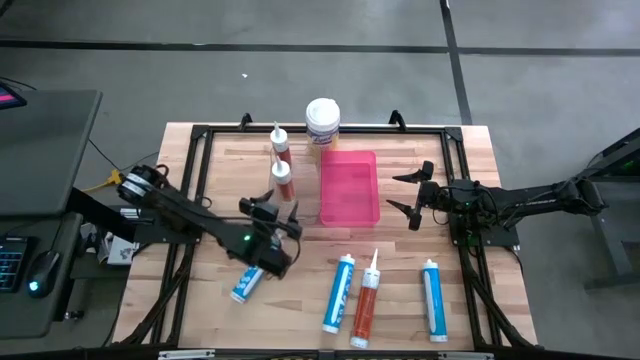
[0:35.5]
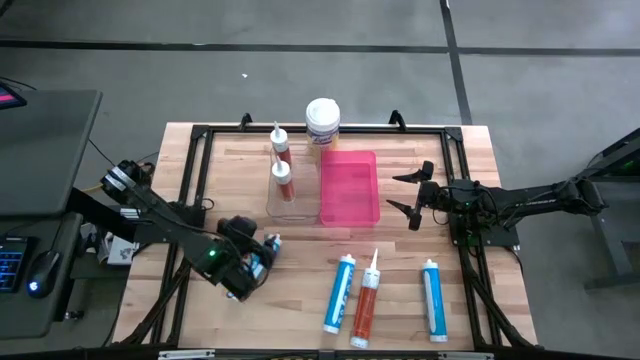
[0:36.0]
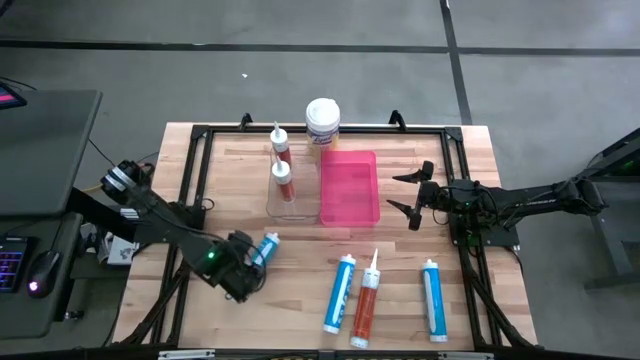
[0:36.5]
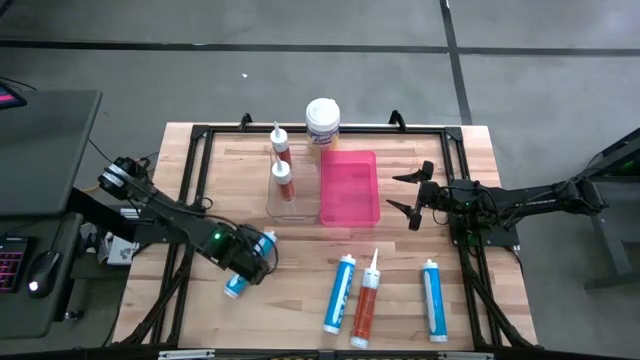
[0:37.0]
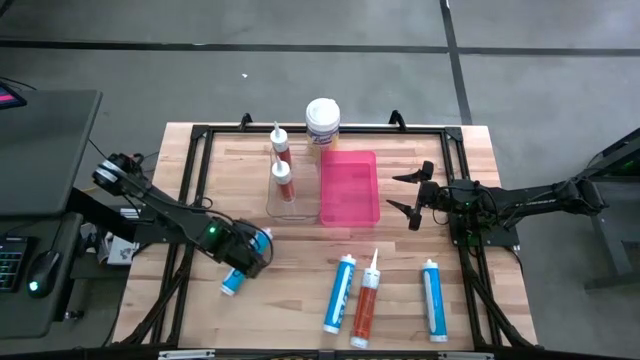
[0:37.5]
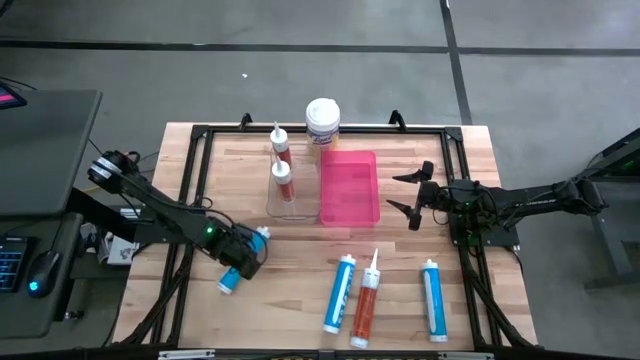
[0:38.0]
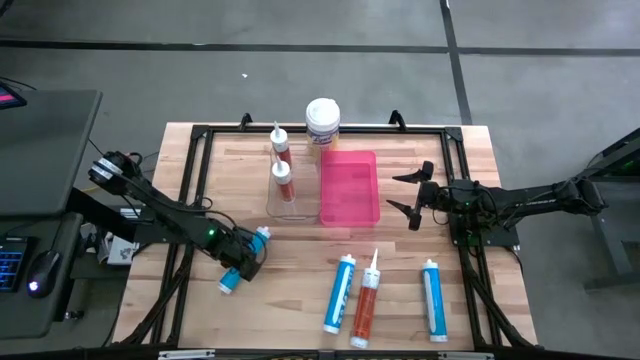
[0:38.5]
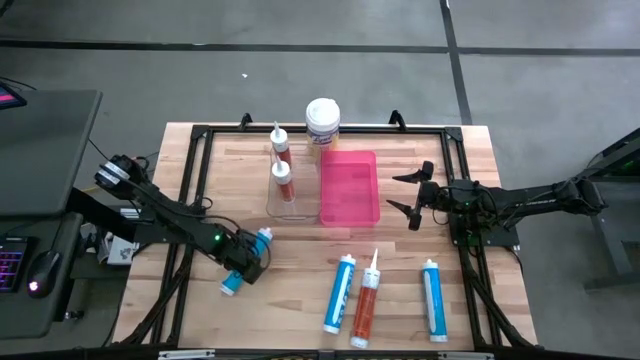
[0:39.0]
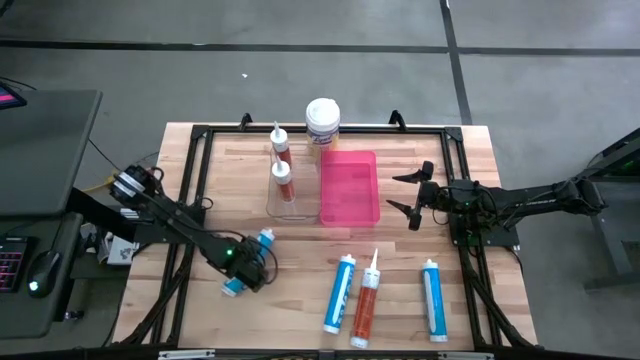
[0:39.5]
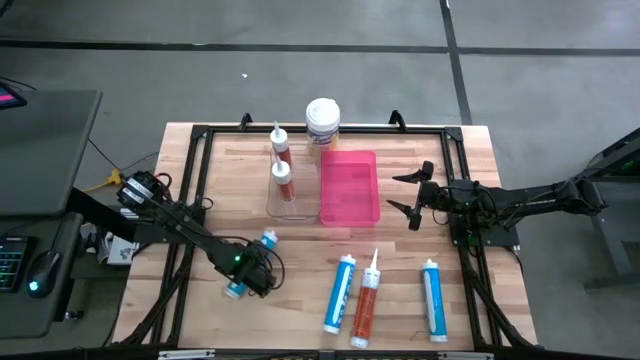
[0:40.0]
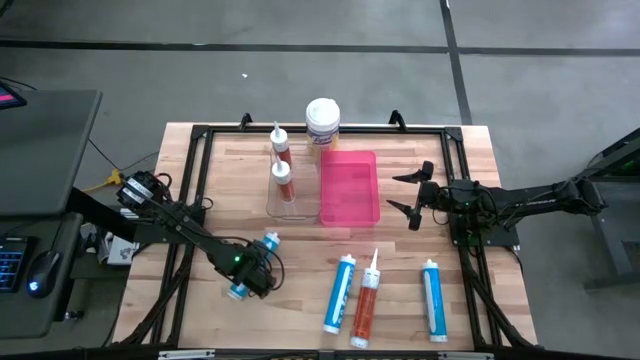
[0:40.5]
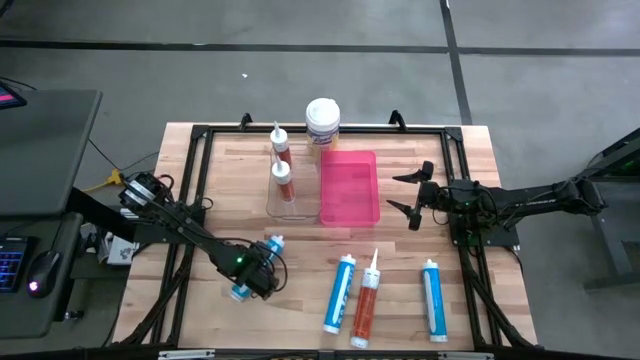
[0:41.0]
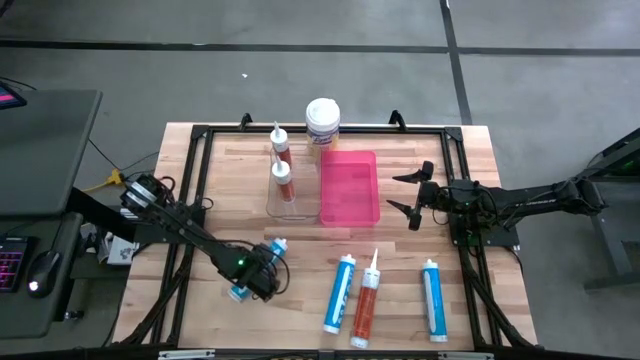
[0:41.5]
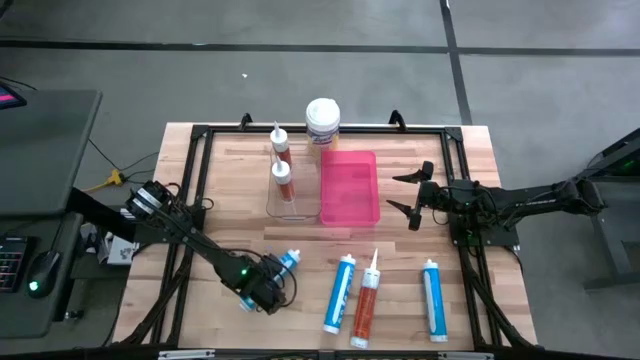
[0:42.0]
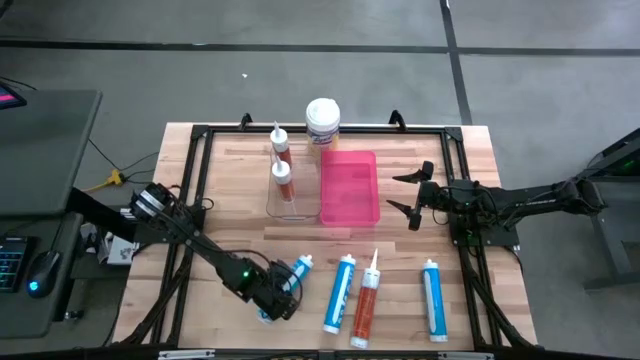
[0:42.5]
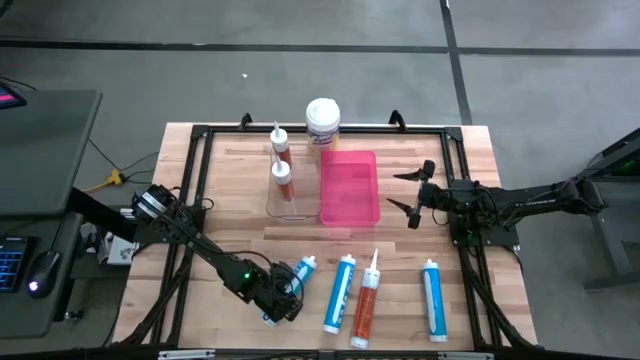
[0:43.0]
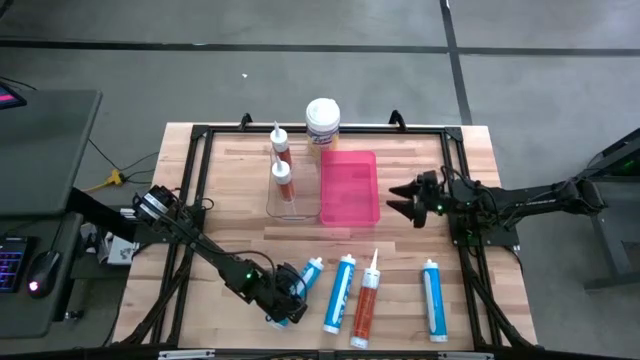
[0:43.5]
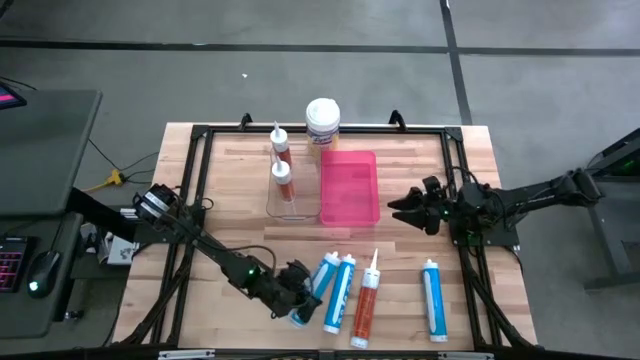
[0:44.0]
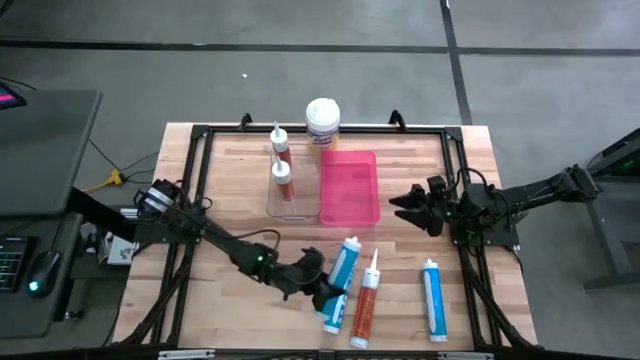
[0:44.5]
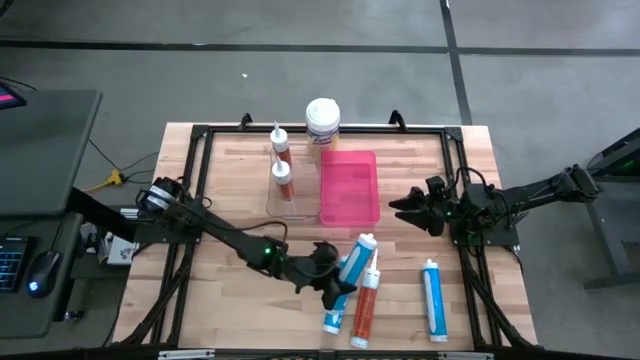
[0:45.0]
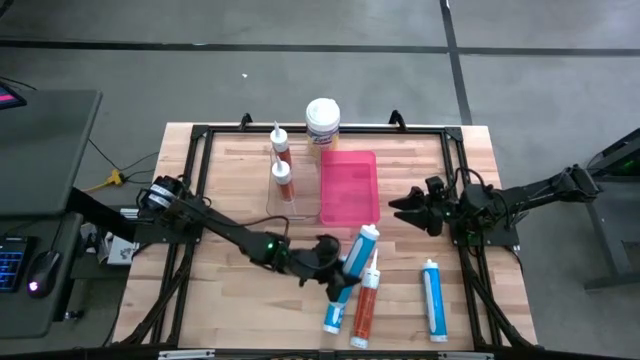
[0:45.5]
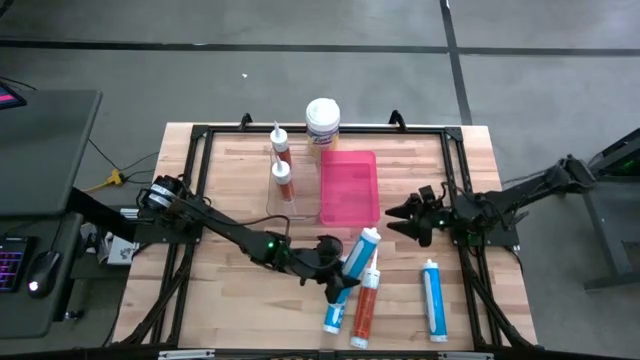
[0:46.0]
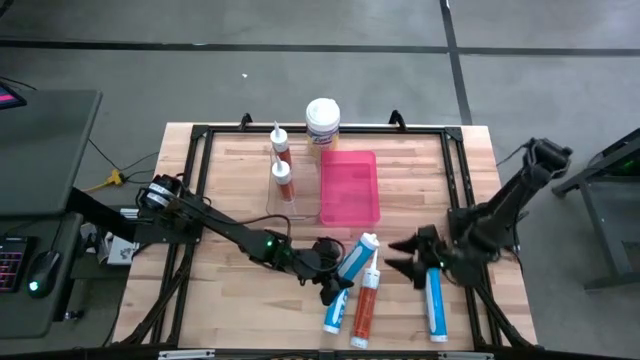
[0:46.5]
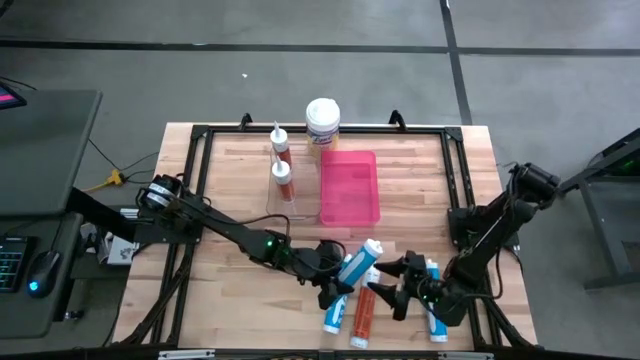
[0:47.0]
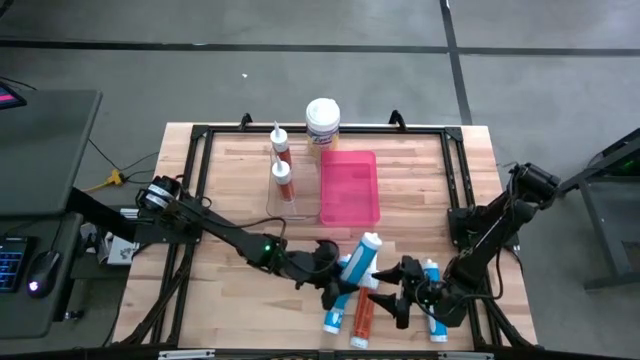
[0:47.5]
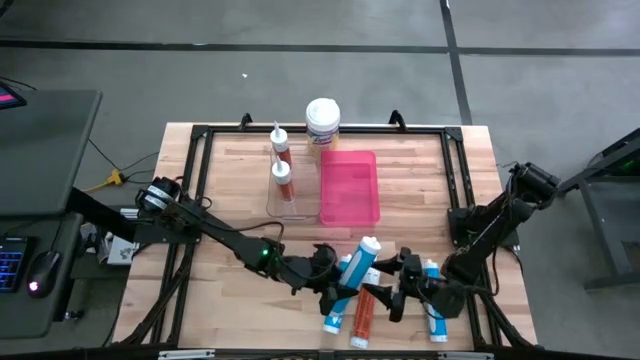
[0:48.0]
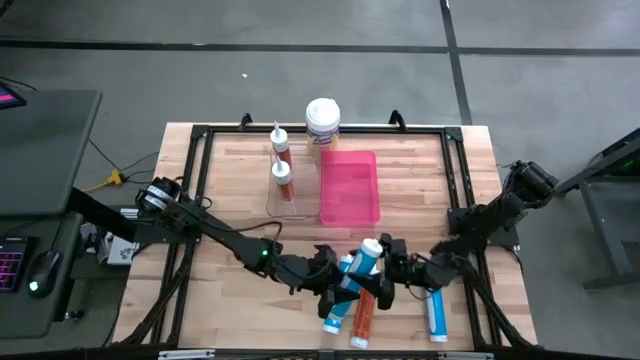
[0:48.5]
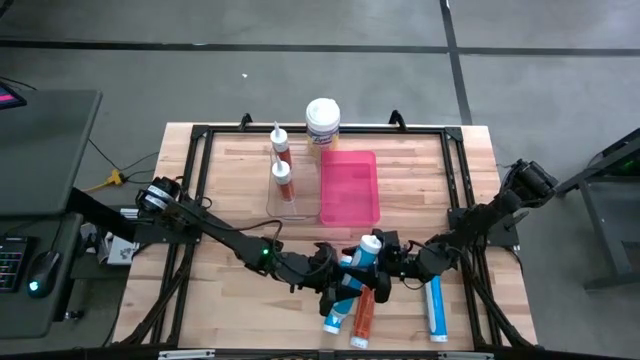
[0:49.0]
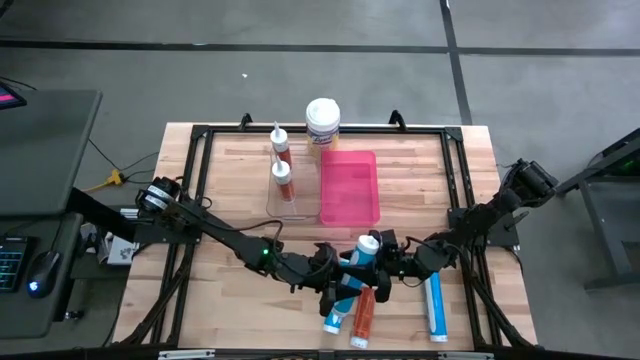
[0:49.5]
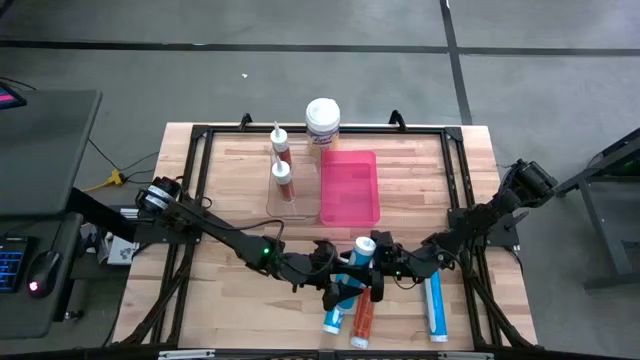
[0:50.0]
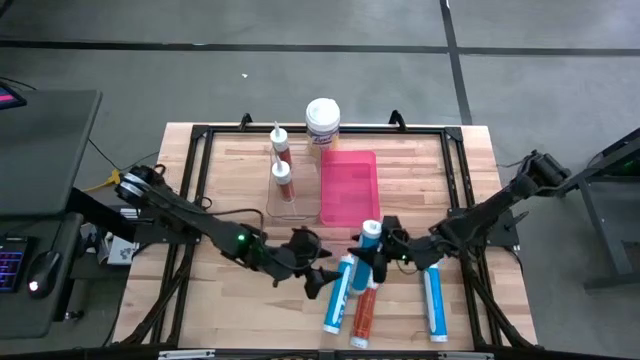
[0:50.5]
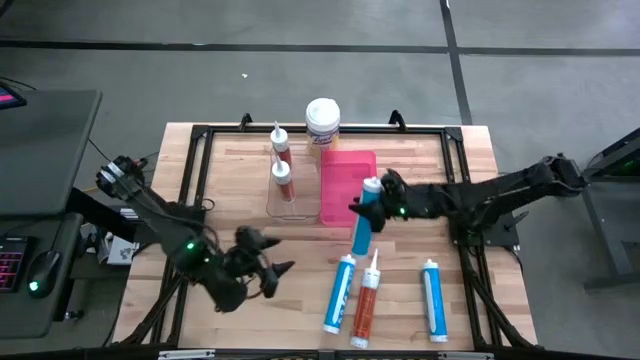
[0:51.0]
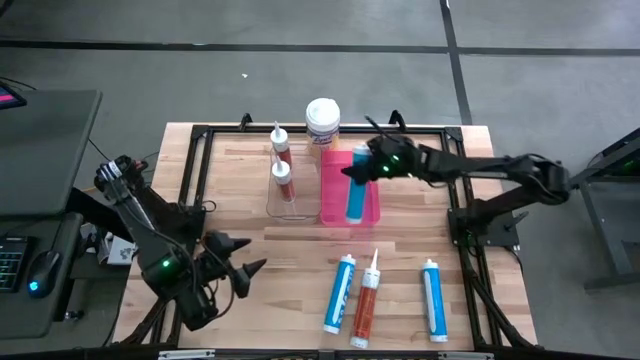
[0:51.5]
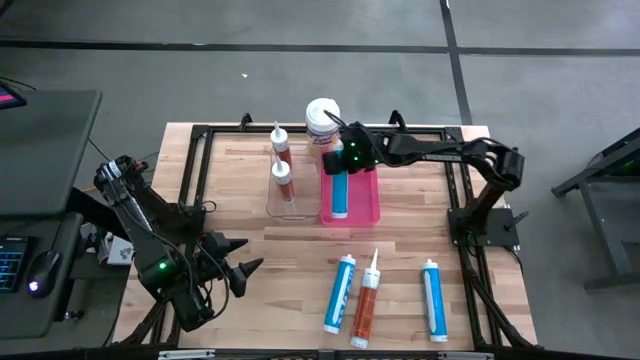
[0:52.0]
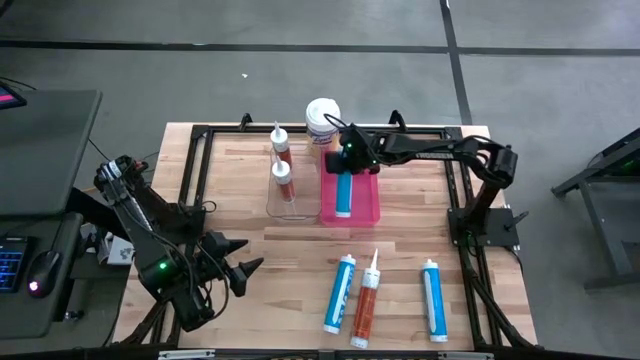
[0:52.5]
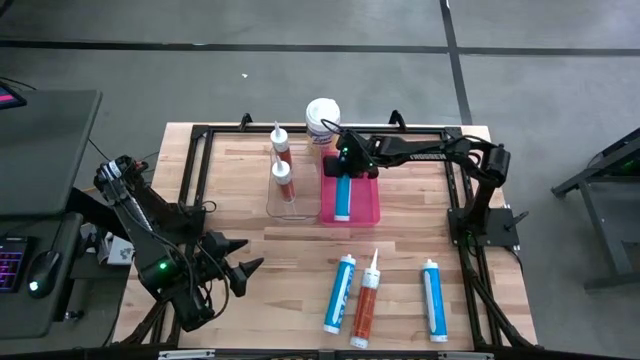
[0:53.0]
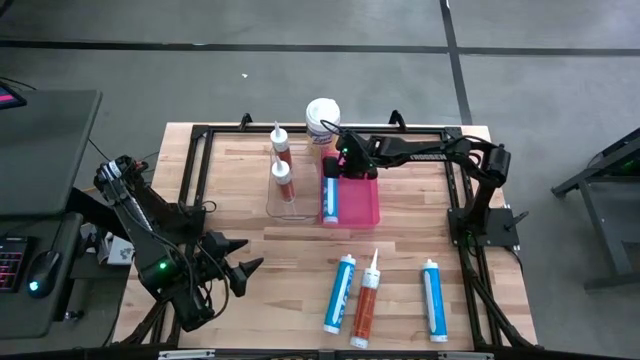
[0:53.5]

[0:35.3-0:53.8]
Task: Pick & place silicon tubes, Sealant and Lysol wipes
Put the left blue sealant into the pink container

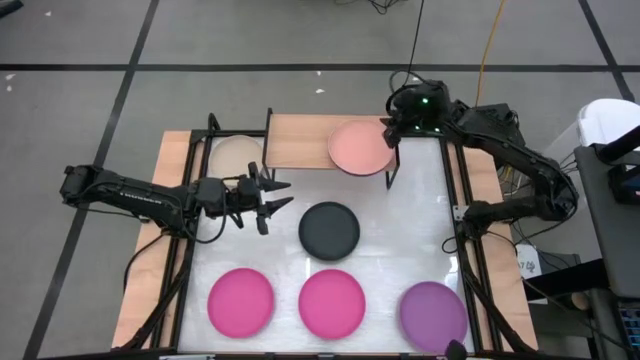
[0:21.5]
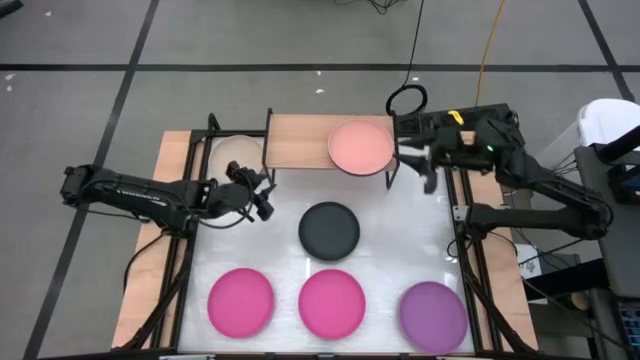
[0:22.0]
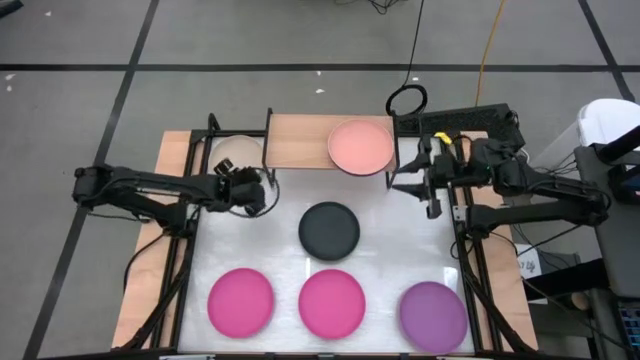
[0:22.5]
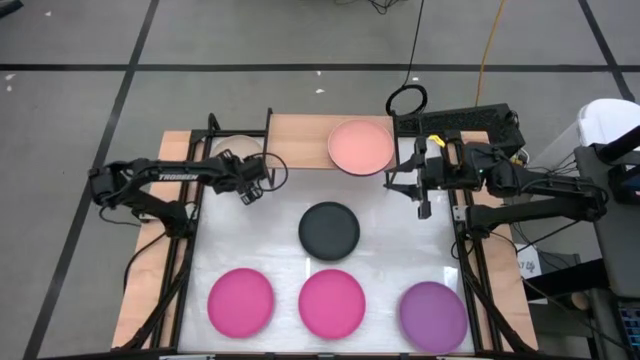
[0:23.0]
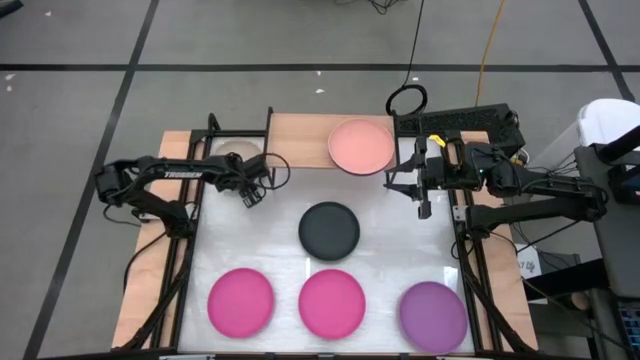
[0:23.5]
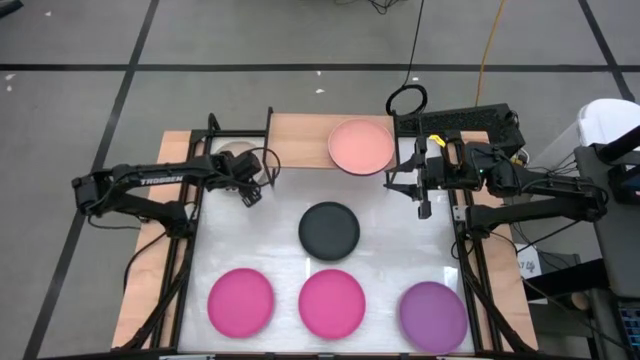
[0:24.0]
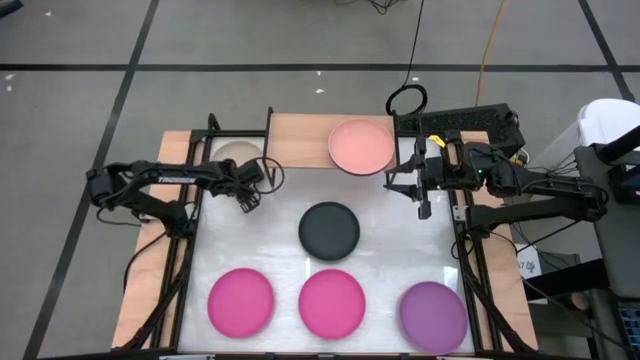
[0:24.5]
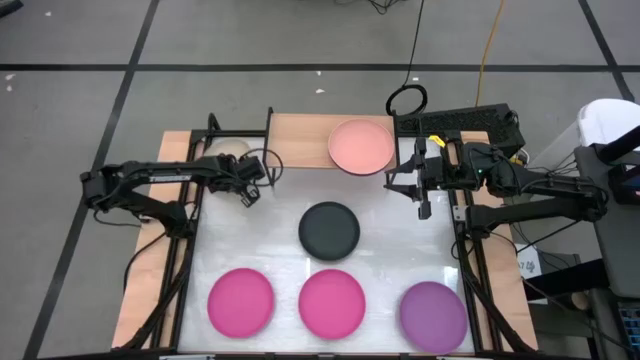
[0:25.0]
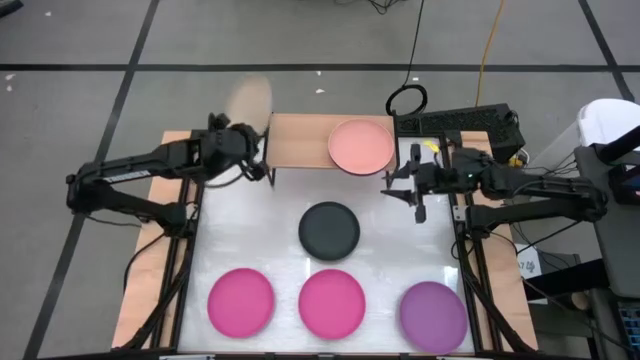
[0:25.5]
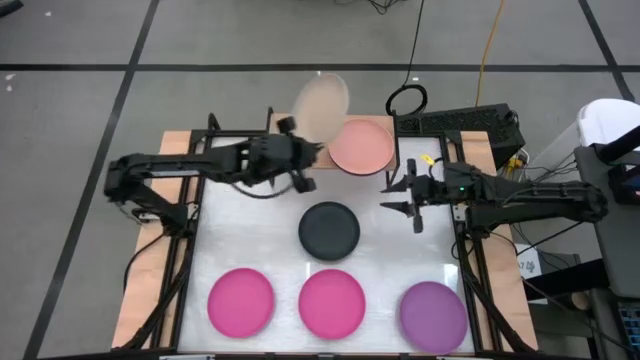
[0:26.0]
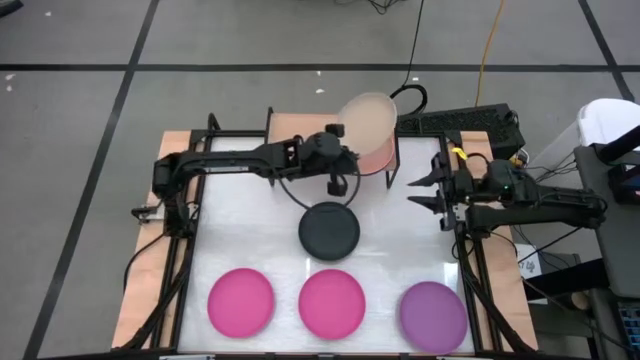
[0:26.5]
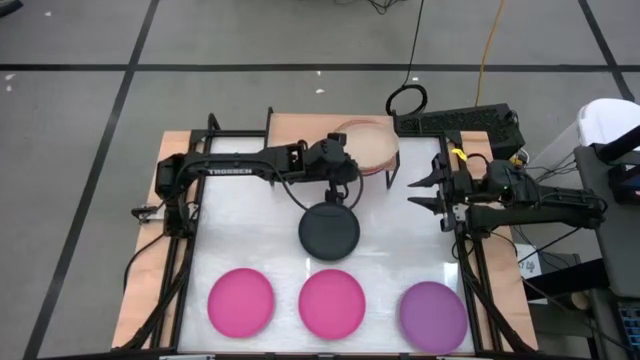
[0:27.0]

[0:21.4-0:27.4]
Task: Place and stack plates onto a shelf
Stack the light brown plate on top of the light orange plate on the shelf
